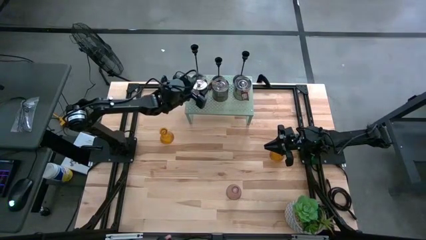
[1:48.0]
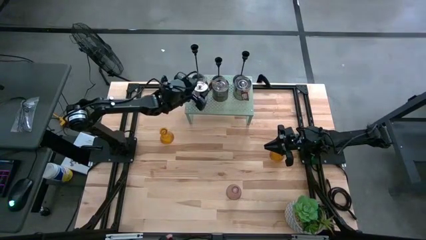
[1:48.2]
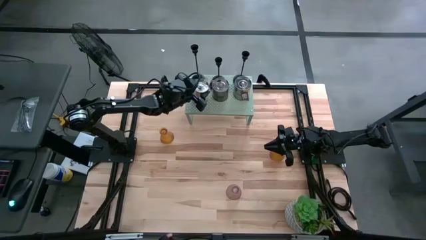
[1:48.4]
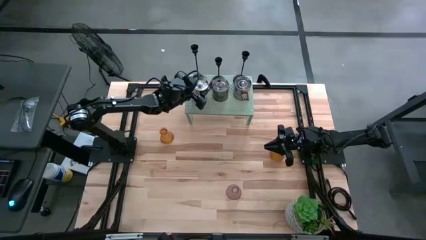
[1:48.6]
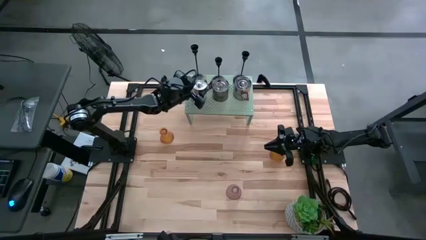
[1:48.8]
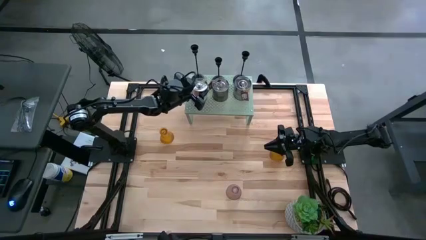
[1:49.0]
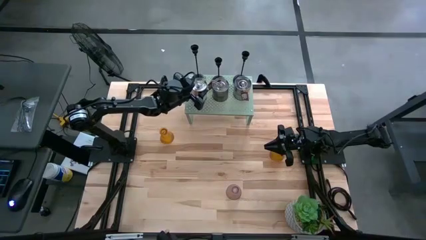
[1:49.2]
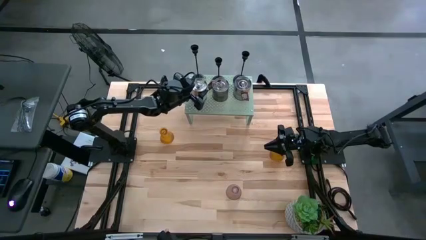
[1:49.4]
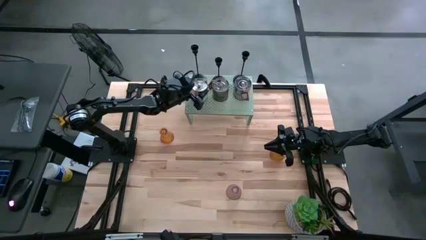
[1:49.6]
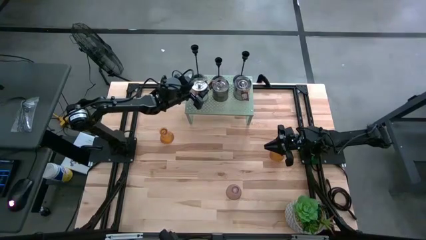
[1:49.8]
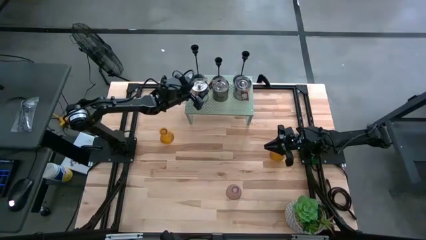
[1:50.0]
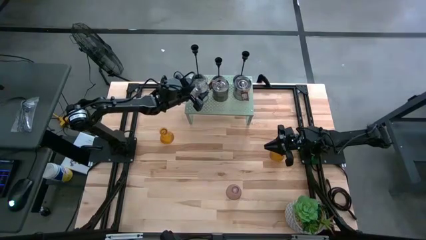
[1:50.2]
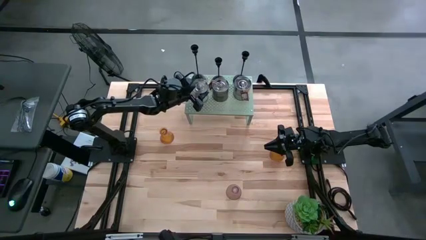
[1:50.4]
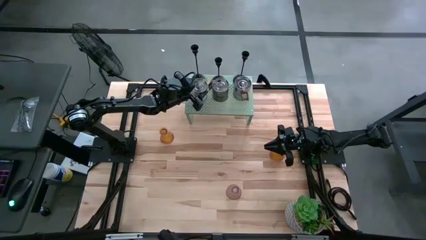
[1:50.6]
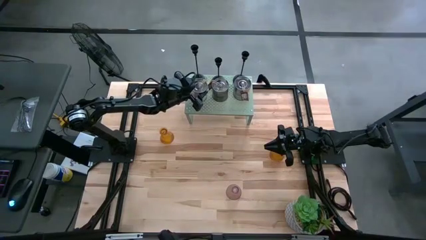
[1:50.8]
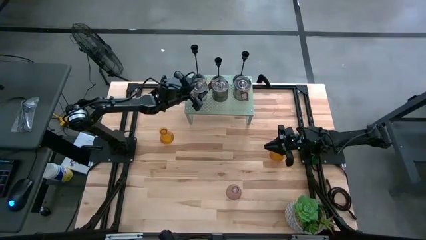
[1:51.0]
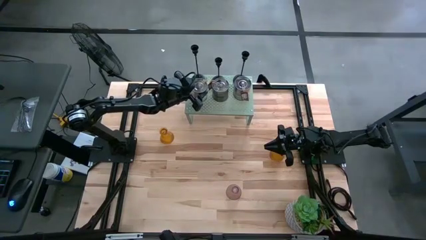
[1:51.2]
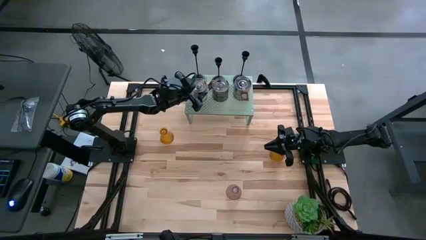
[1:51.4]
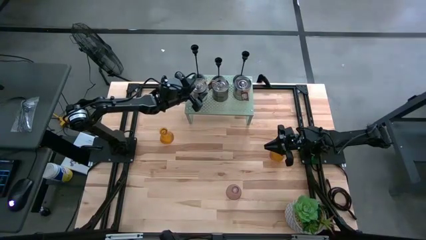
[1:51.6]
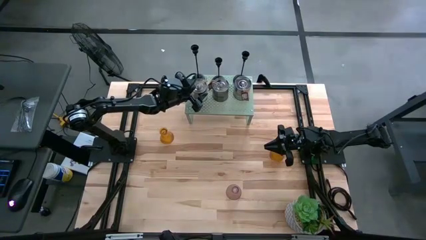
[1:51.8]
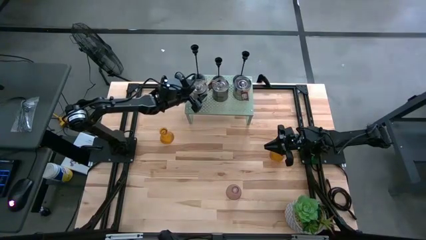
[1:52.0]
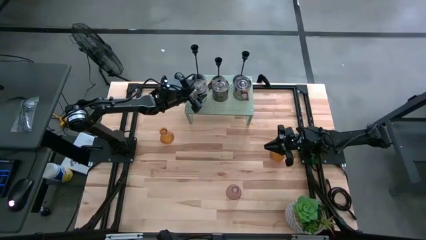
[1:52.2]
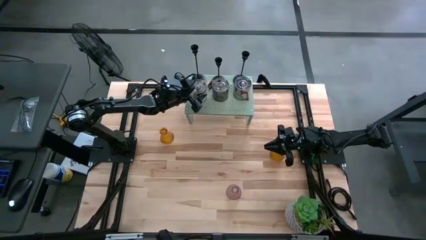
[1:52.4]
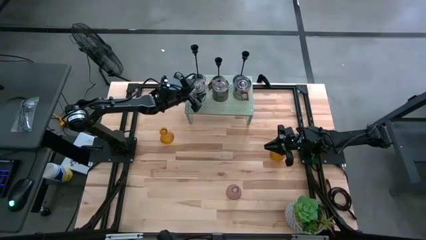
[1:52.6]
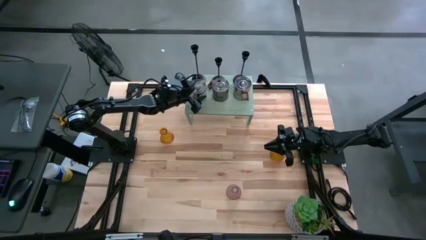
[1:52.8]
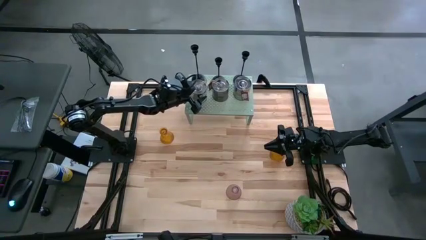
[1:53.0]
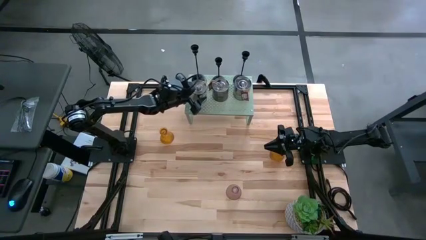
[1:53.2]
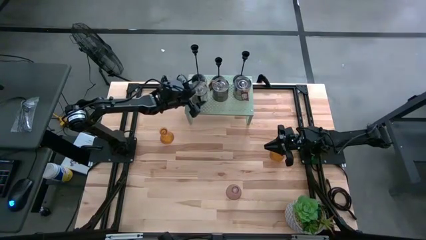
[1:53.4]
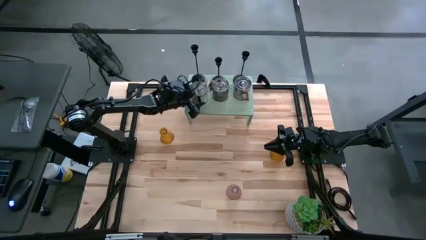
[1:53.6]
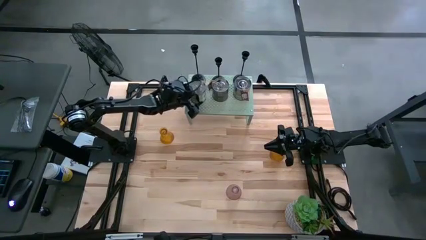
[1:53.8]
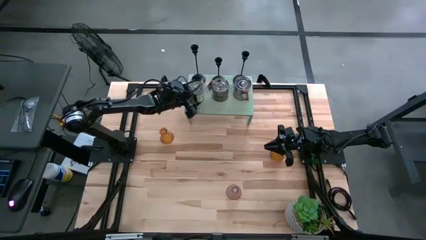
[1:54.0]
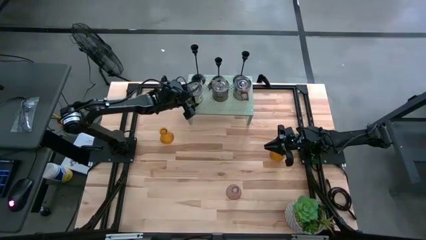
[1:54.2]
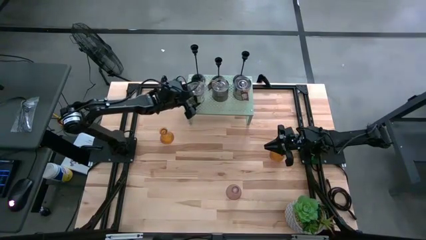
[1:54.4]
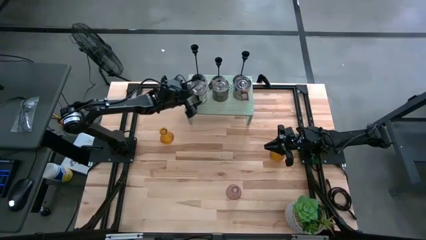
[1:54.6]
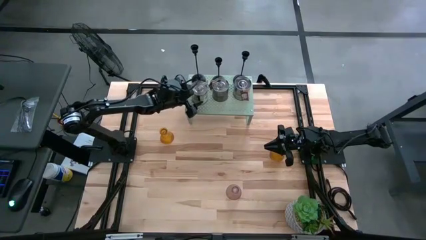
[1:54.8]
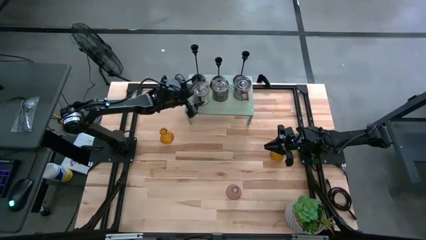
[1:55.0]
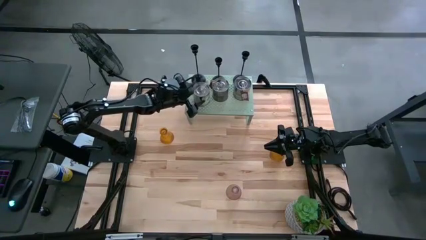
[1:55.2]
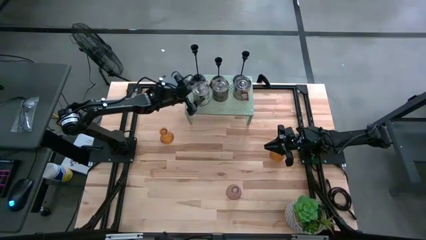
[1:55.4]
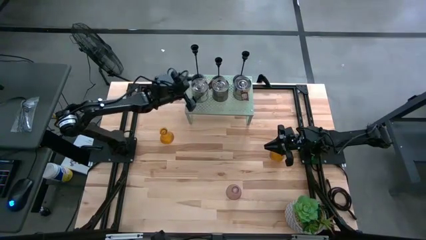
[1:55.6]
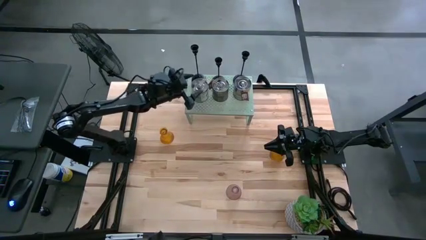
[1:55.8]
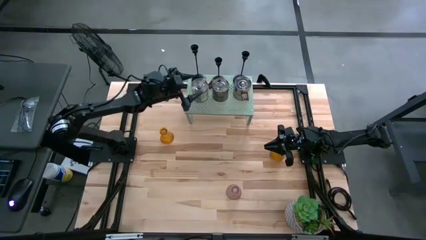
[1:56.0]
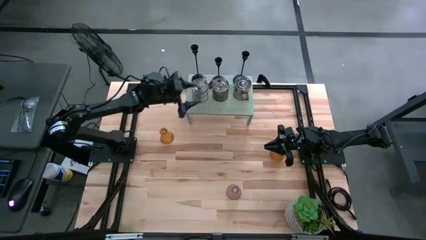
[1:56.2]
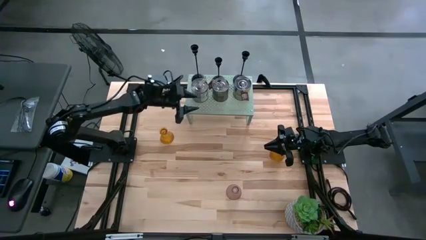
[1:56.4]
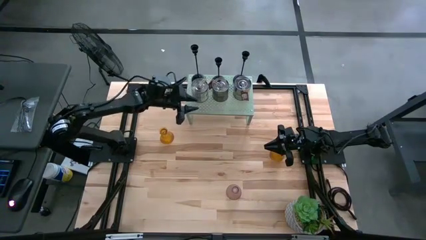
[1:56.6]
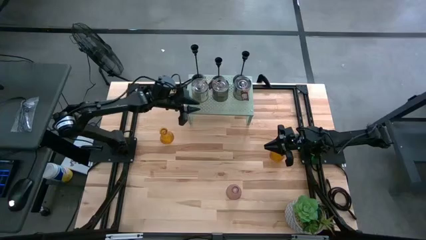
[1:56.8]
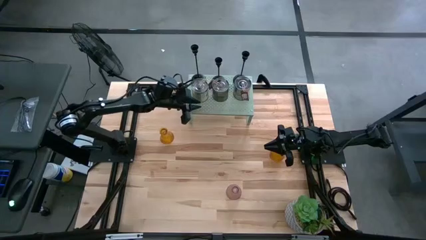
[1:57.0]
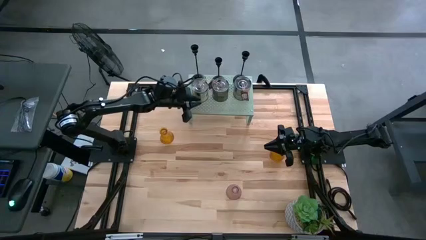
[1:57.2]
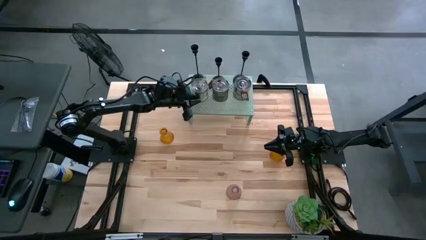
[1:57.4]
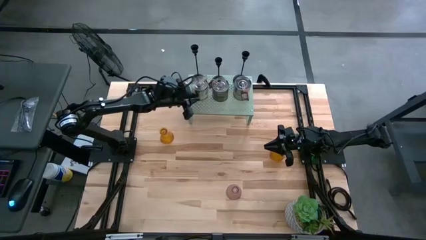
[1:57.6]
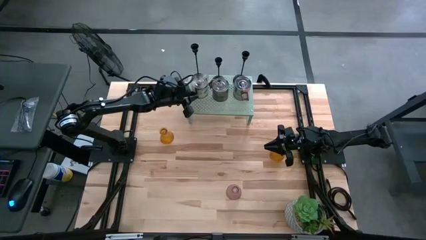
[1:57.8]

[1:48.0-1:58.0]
Task: Pick & Place candle stick holders
Put the scented candle on the shelf

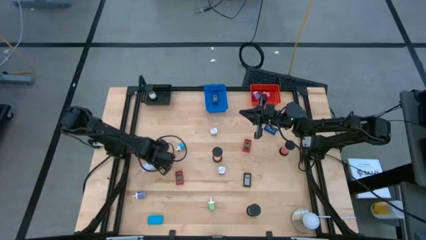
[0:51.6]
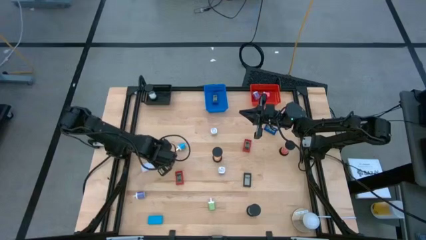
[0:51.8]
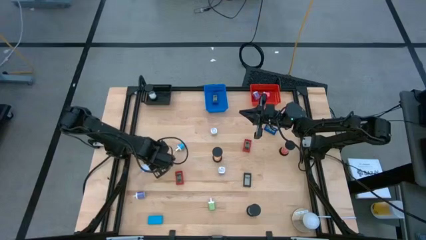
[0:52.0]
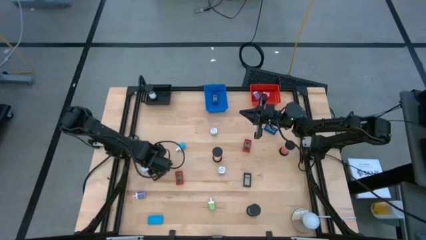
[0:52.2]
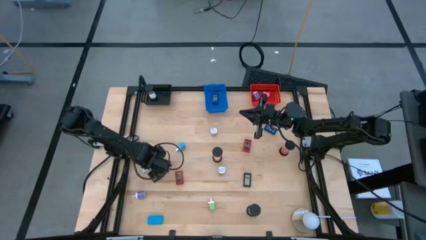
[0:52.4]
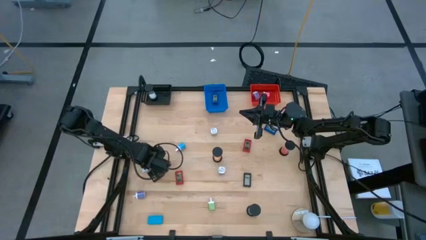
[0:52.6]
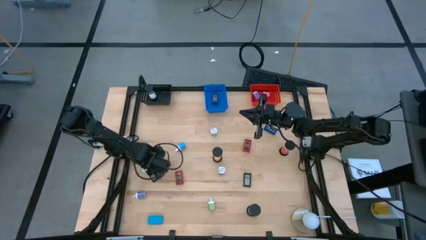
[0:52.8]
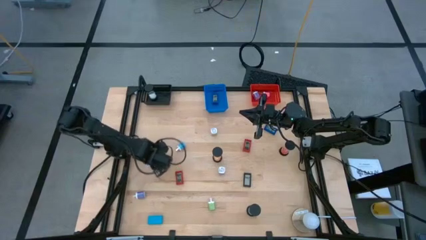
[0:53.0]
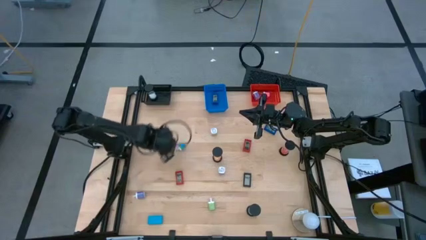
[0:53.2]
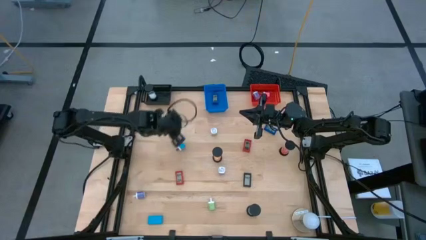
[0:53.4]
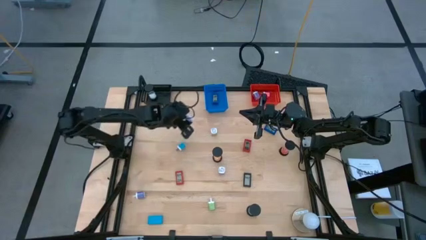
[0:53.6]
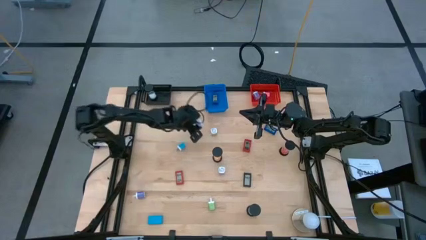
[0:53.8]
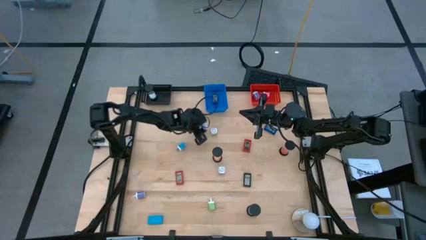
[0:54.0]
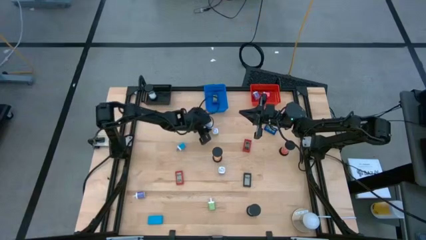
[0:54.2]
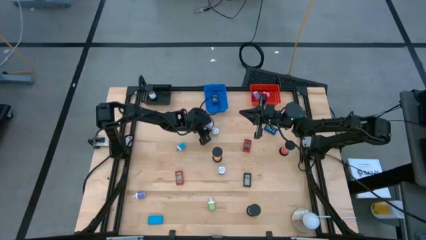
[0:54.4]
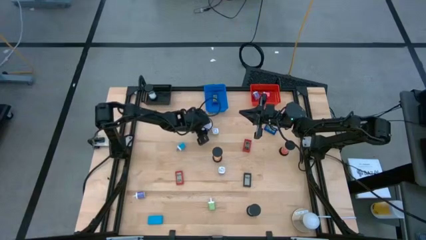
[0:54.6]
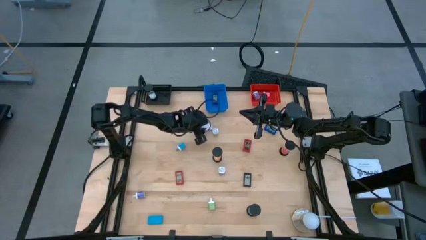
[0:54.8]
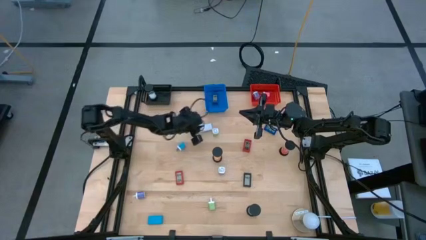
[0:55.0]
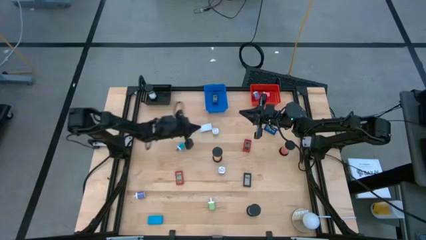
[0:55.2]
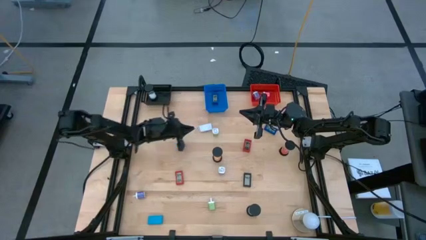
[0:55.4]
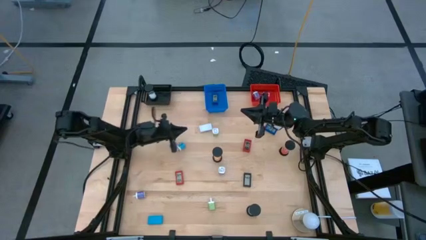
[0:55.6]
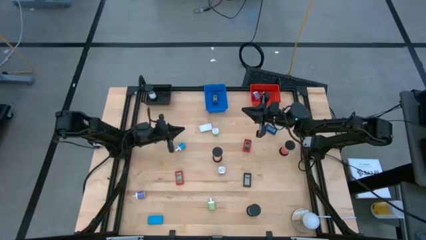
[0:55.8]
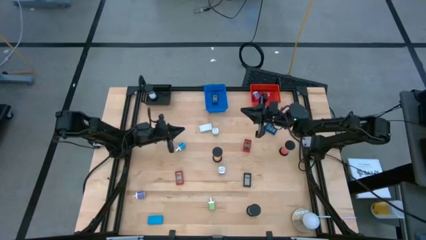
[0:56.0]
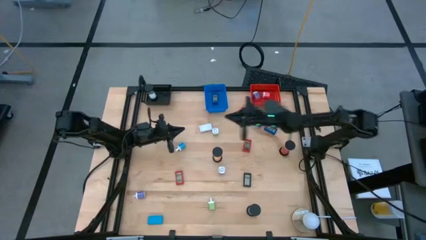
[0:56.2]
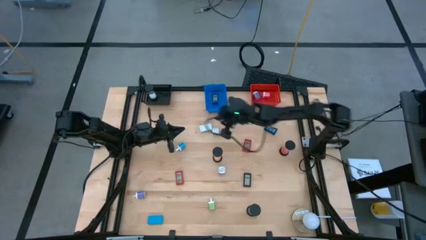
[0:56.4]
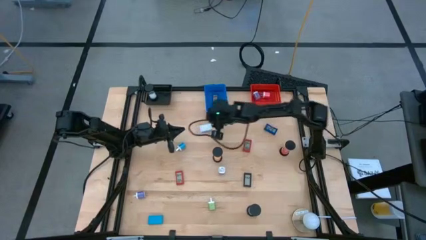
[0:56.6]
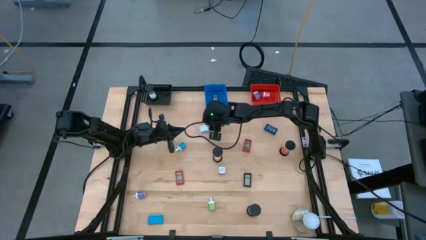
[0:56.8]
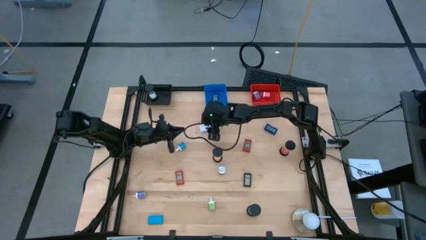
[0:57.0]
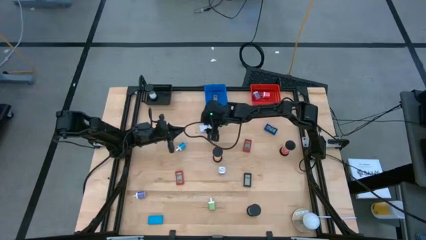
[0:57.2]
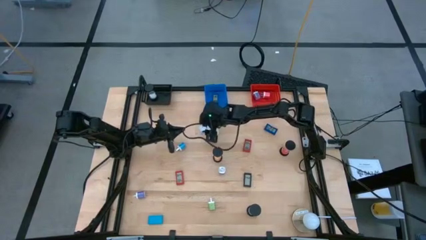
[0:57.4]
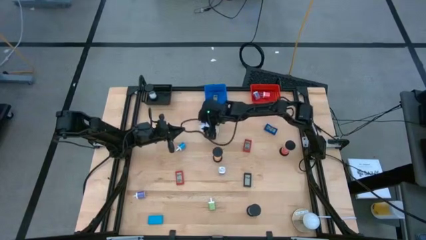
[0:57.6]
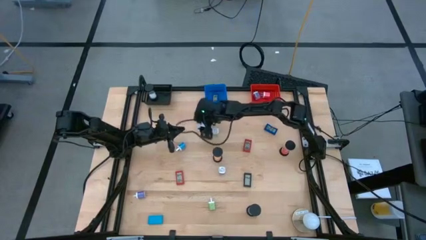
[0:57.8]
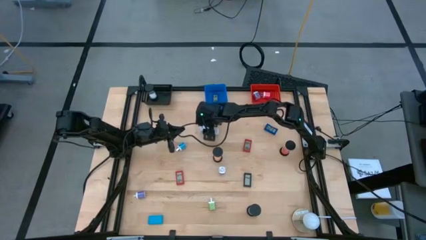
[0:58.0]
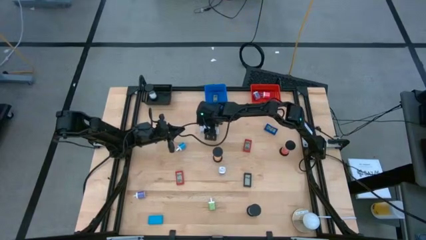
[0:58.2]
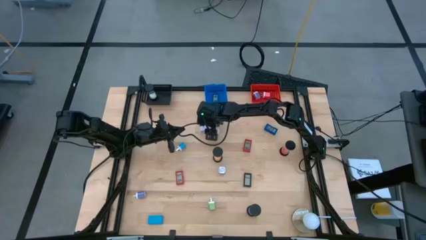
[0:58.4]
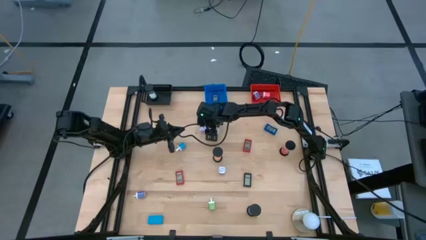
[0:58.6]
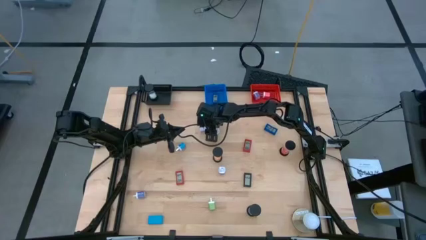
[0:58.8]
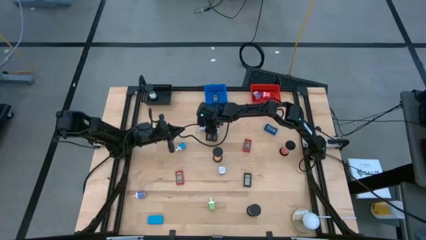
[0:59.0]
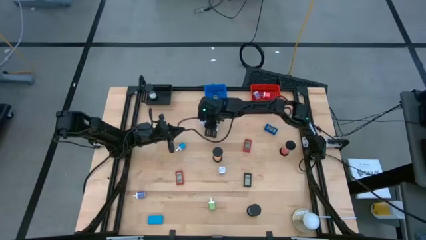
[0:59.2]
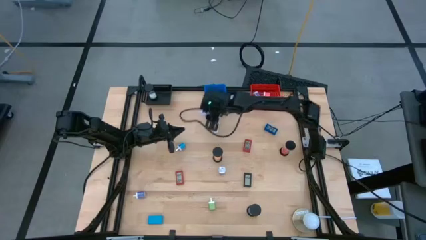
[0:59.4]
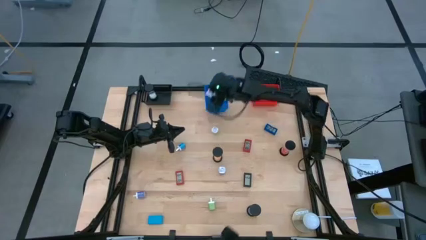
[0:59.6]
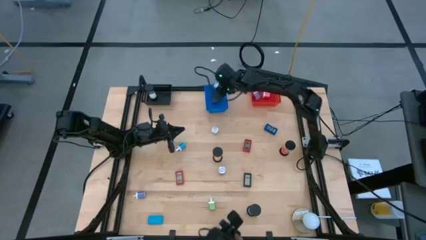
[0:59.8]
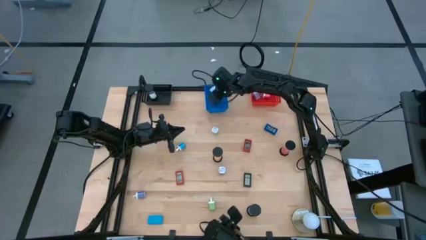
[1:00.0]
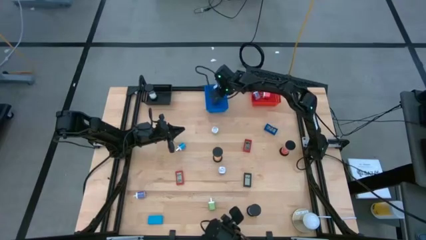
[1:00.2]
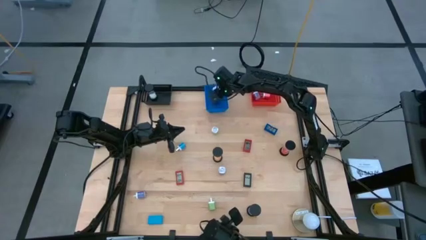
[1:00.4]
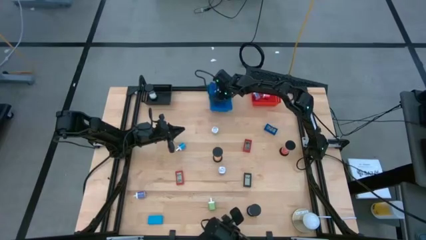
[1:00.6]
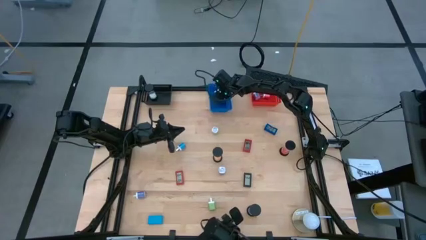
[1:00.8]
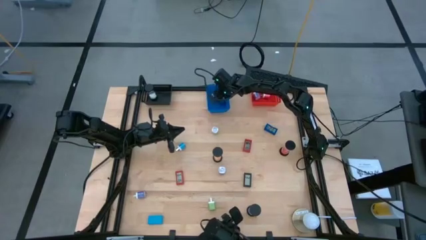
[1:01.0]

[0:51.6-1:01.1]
Task: Pick & Place Office items
Put the white digital clock into the blue basket
